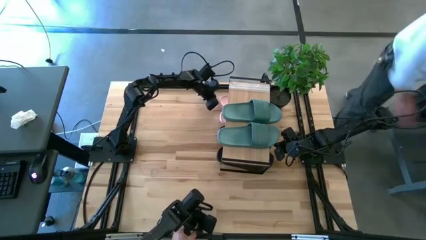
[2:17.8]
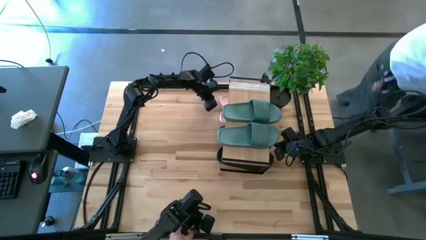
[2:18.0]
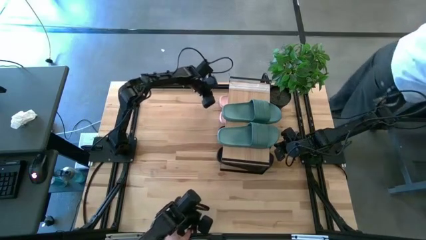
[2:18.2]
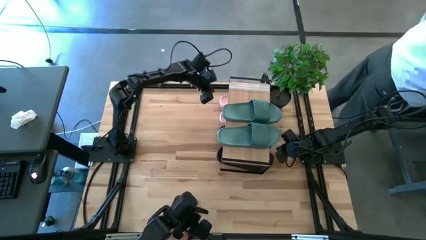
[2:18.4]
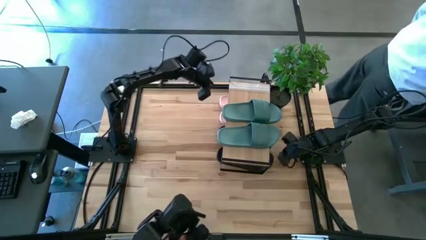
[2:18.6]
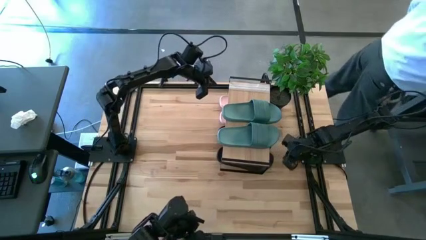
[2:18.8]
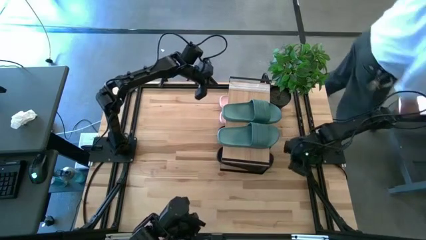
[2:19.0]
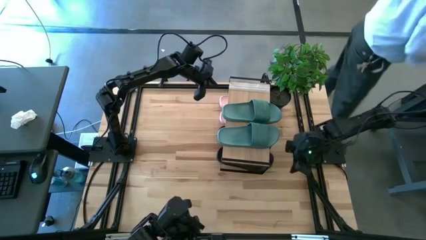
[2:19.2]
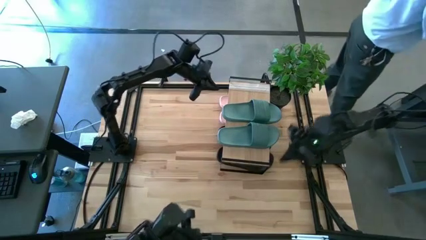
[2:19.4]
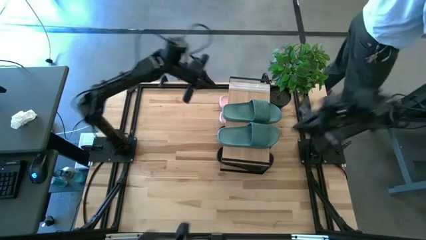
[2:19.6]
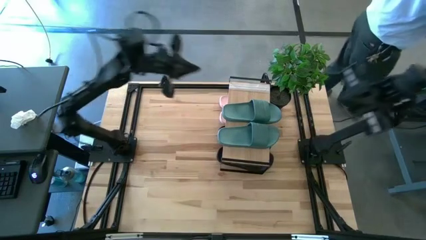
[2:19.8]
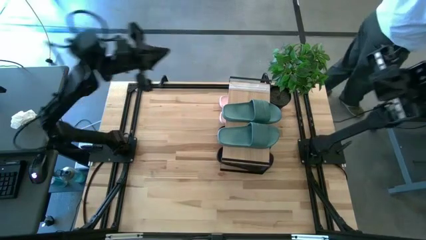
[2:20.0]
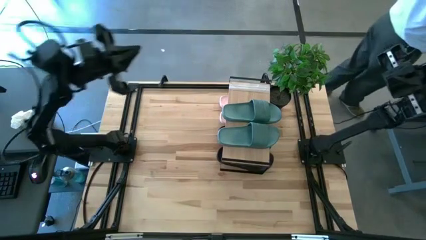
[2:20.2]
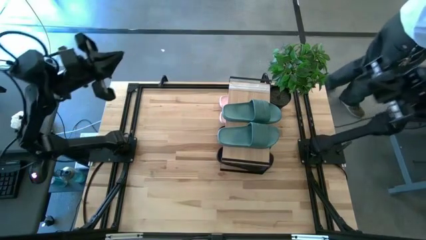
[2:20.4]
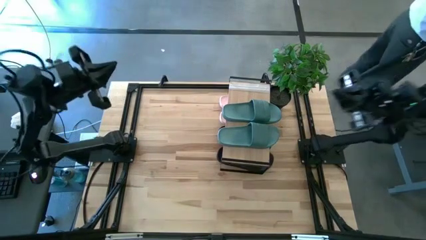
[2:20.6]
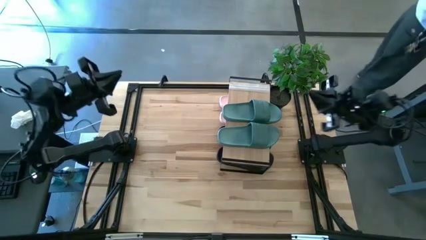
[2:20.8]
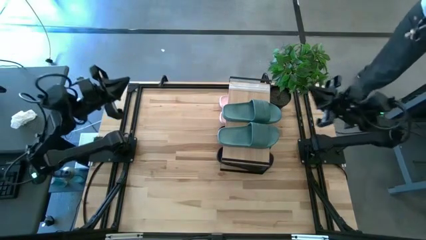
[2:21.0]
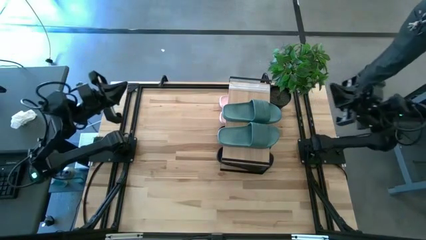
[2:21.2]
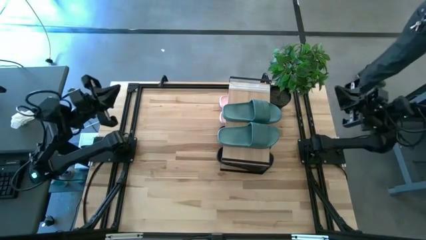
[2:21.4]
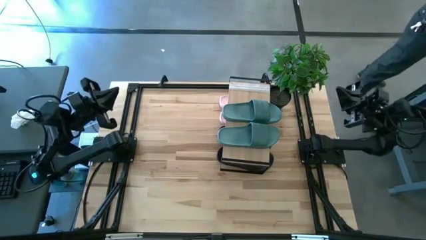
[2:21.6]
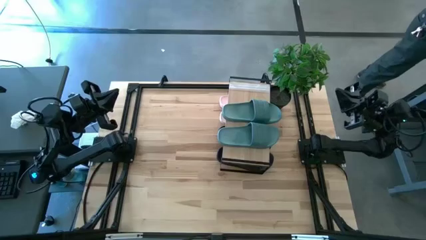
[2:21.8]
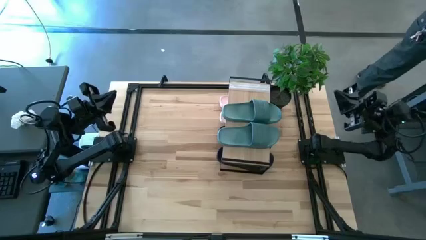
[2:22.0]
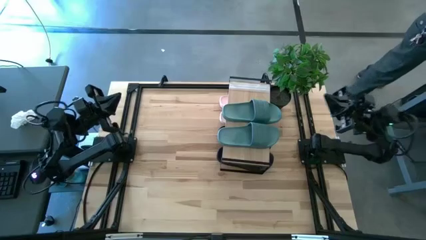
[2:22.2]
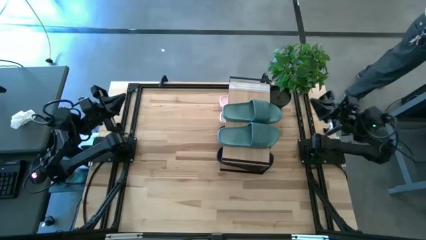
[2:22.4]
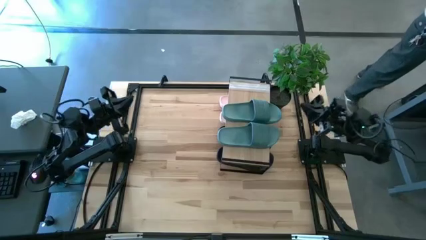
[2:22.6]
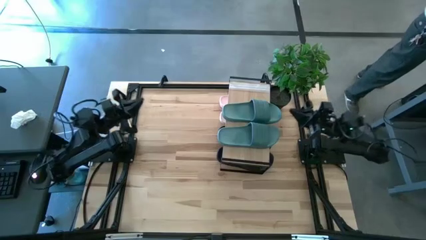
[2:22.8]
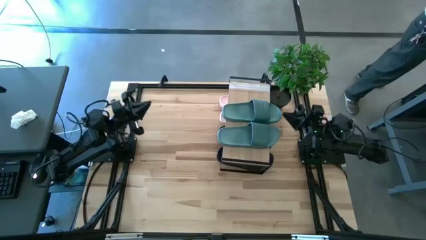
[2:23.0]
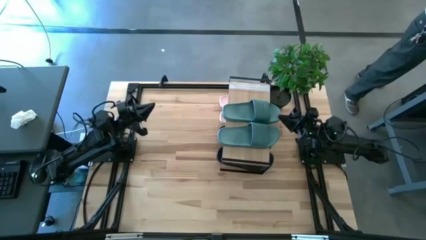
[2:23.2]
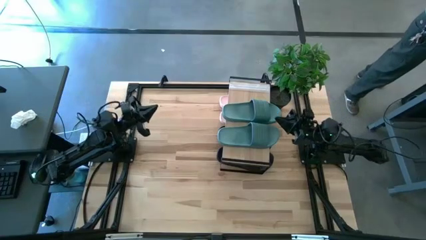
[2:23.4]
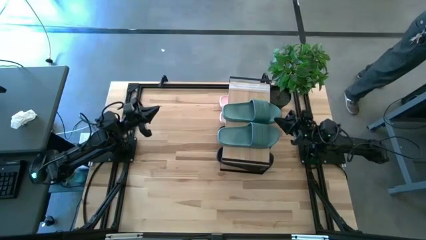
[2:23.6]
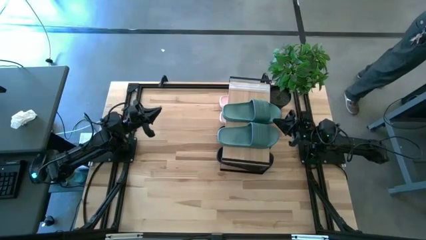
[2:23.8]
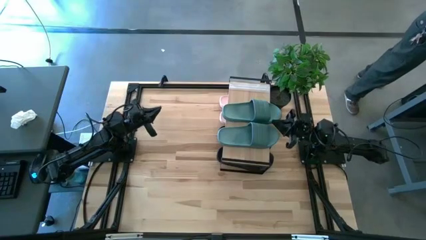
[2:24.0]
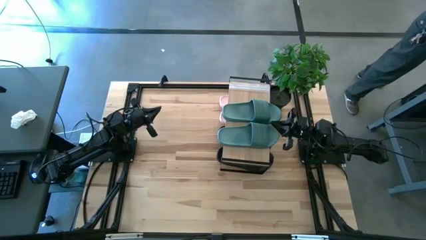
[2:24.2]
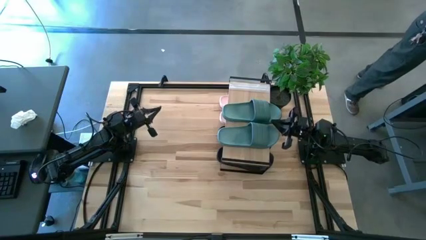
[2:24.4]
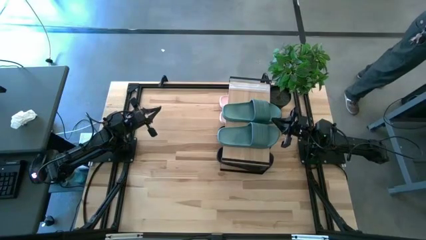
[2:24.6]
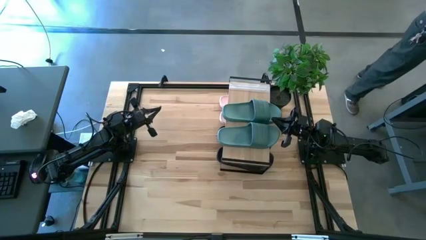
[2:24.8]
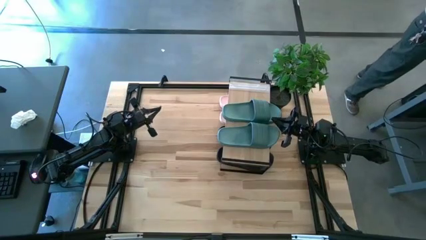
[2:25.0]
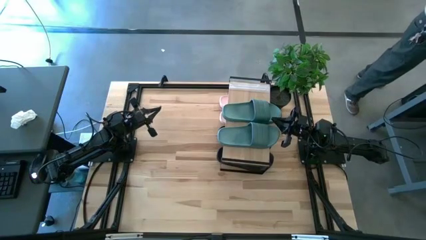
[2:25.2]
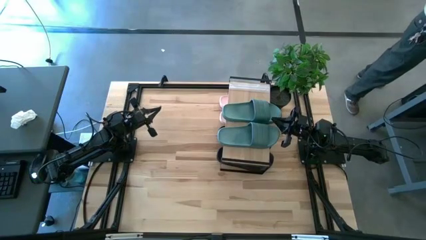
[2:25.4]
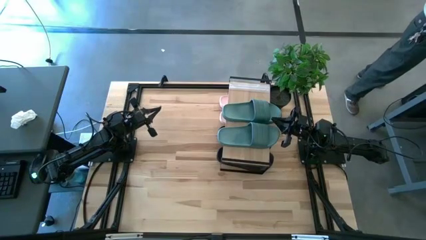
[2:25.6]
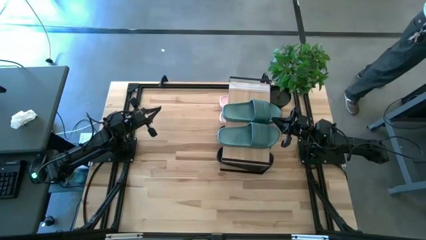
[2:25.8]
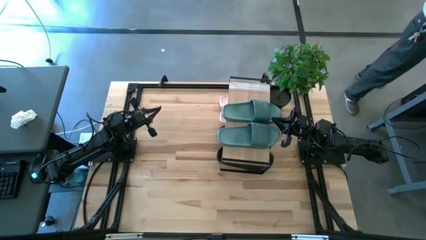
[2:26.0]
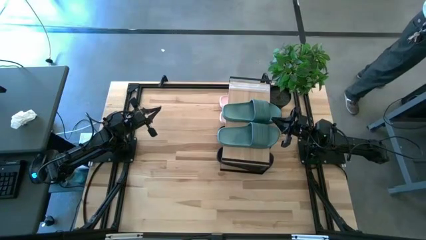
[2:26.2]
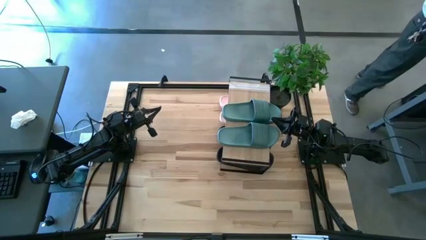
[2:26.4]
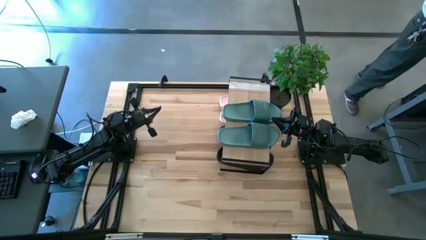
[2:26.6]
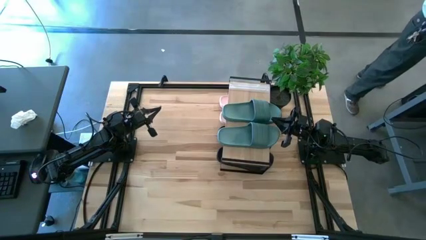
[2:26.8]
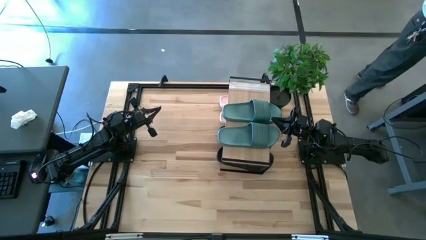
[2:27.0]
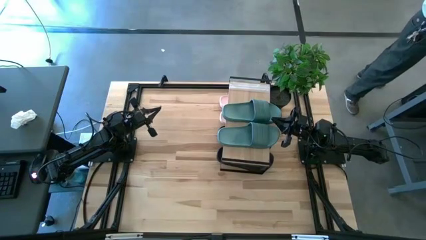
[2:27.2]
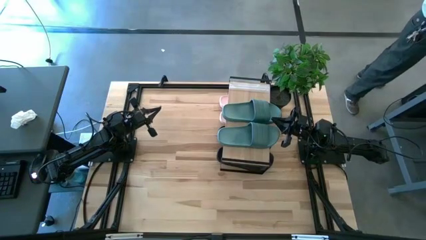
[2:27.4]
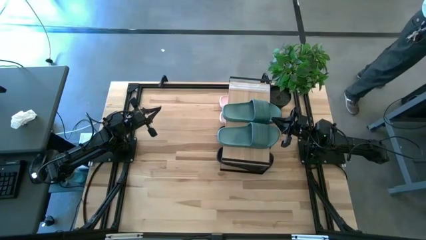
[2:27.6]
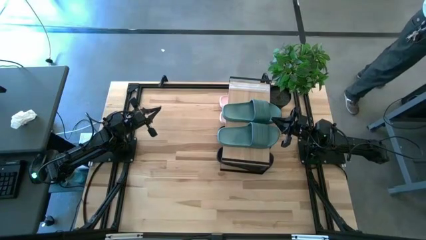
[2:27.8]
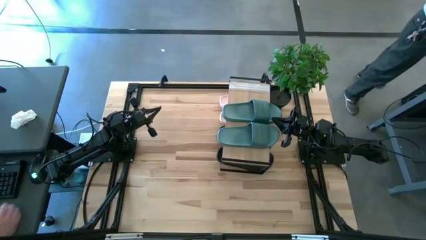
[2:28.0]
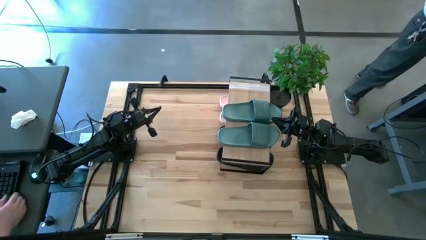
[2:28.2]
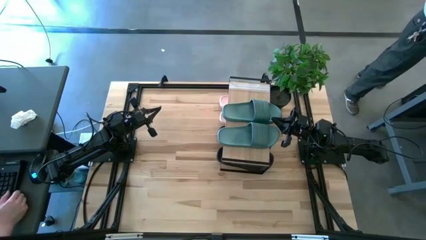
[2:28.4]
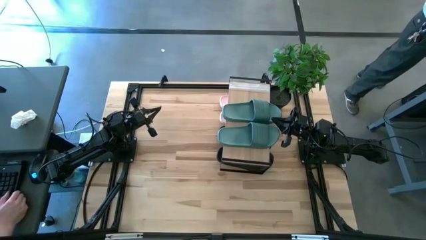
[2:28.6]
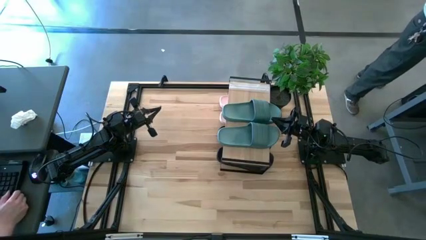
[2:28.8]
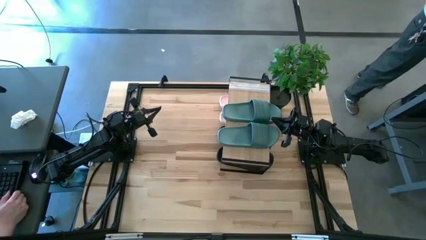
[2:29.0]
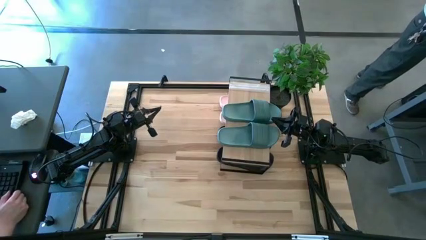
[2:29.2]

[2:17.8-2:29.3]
Task: Pick and place slides into the shelf
Return to Home Position

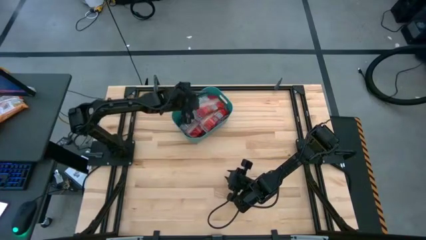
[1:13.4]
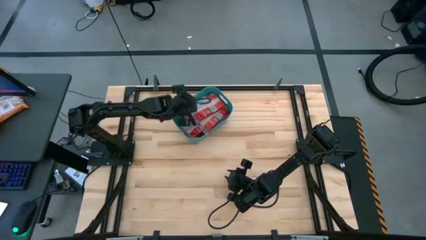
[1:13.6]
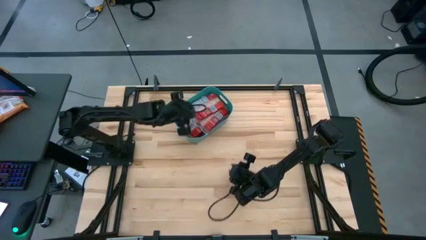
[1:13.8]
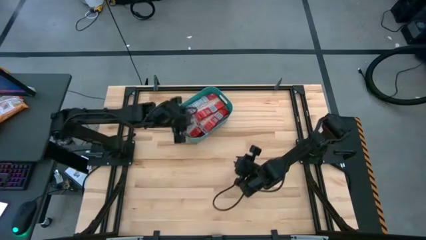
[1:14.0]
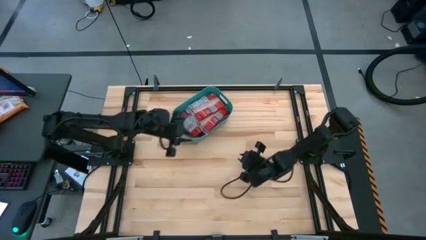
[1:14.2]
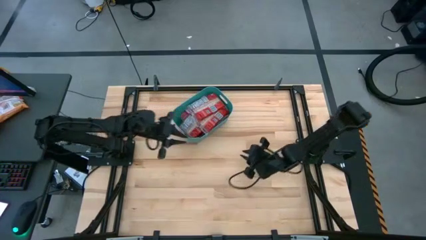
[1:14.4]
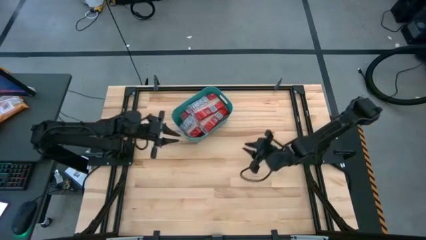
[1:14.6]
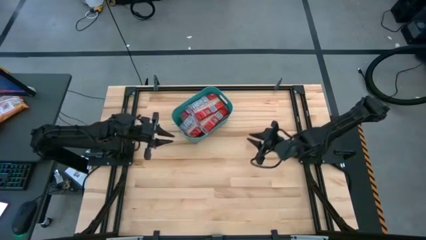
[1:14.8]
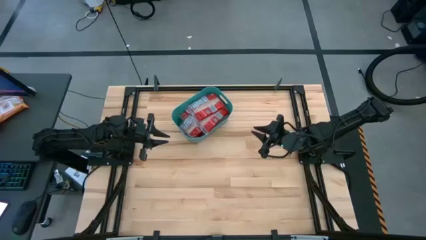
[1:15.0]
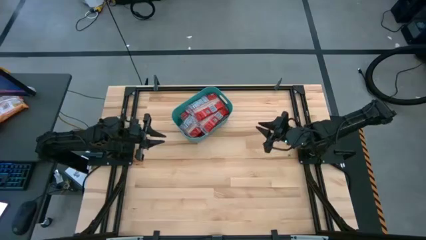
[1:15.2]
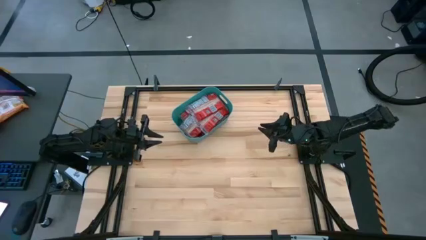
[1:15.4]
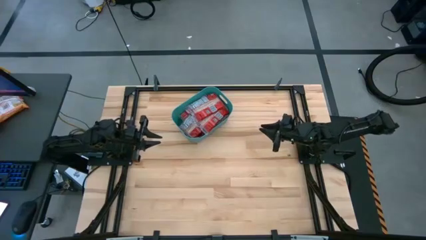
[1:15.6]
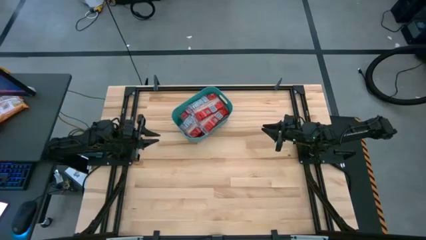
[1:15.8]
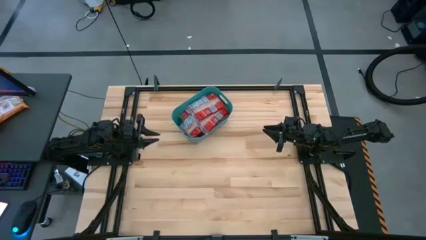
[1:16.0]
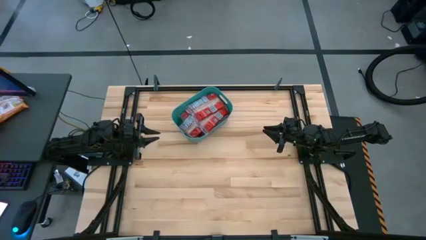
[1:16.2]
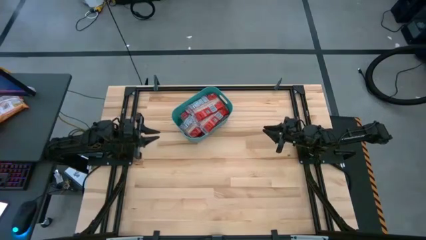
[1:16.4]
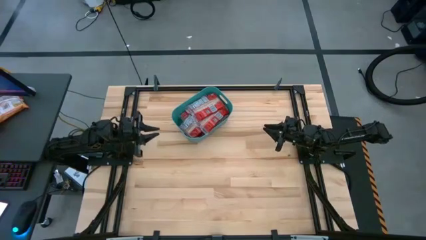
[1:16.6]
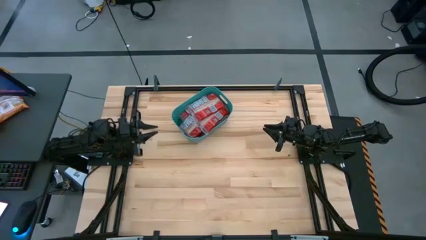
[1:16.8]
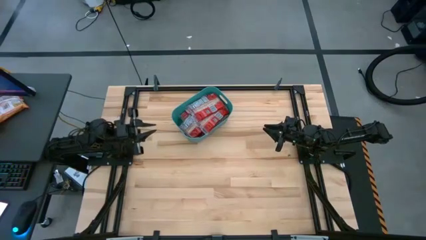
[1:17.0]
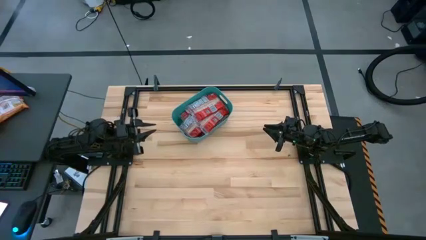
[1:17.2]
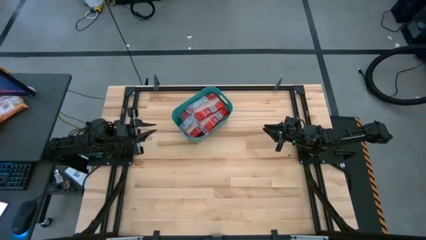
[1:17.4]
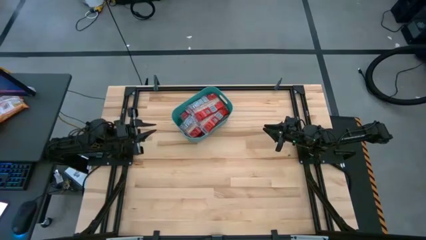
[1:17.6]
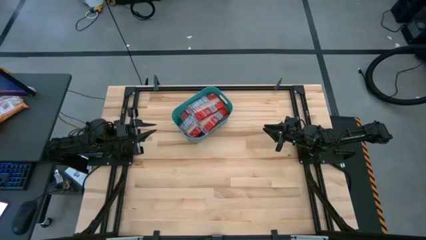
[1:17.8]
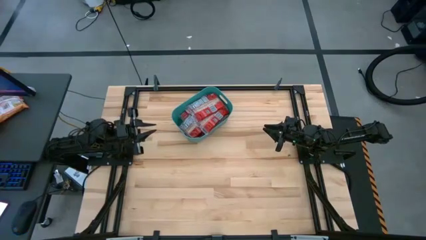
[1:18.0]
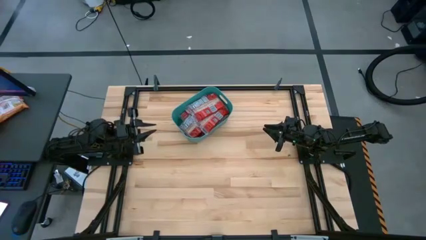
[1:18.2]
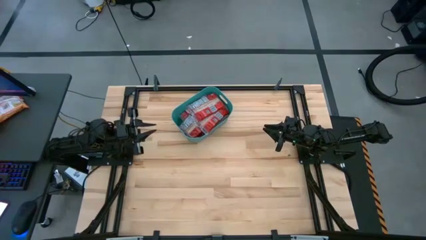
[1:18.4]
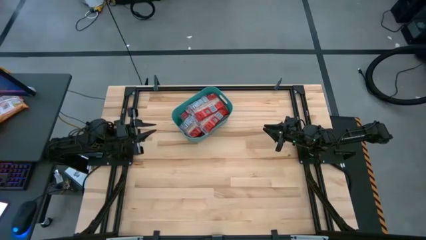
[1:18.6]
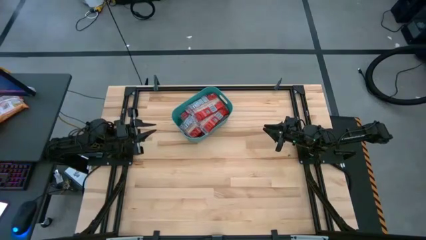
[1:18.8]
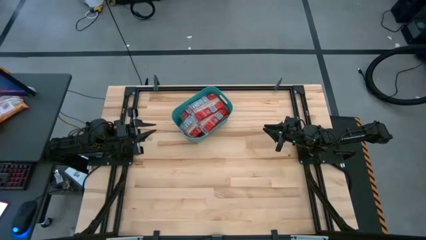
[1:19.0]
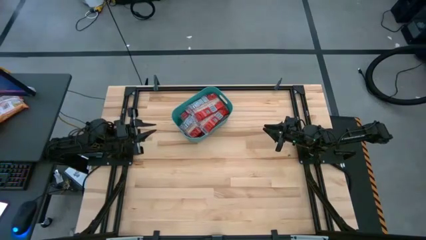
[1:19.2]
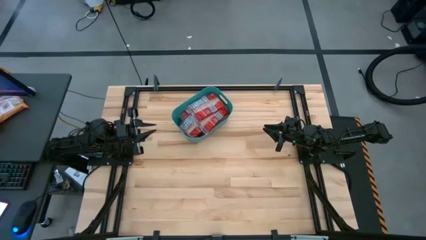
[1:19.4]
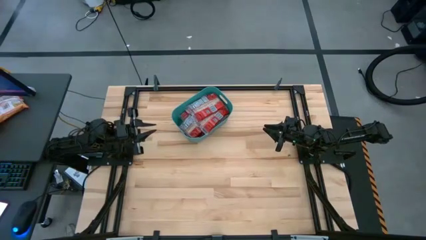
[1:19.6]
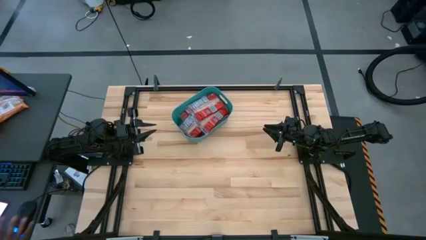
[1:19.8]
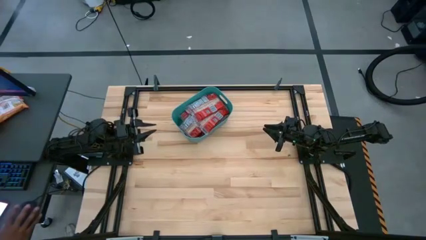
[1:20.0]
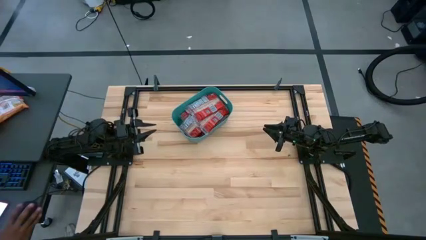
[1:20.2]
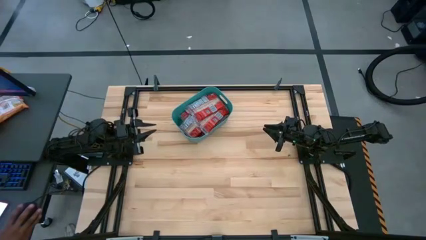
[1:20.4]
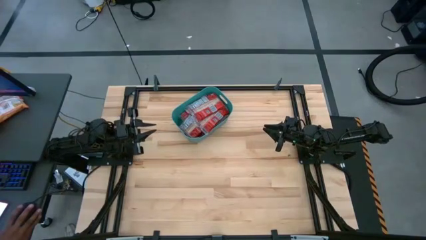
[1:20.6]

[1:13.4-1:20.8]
Task: Sort popcorn bags into baskets
Return to Home Position
